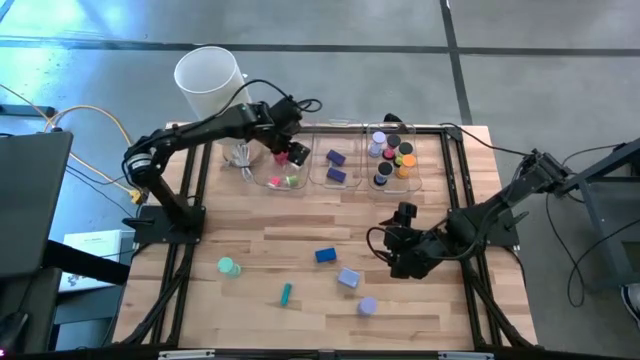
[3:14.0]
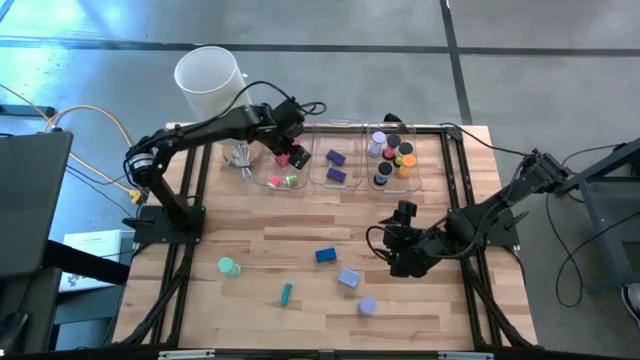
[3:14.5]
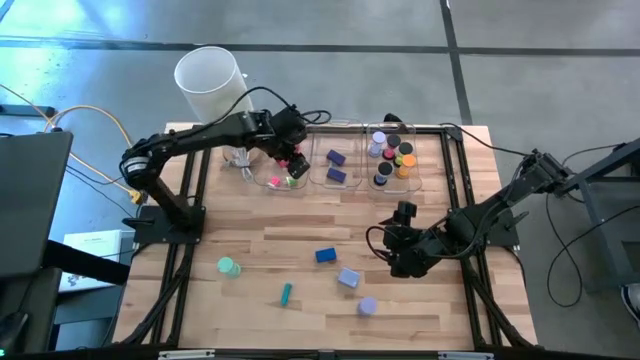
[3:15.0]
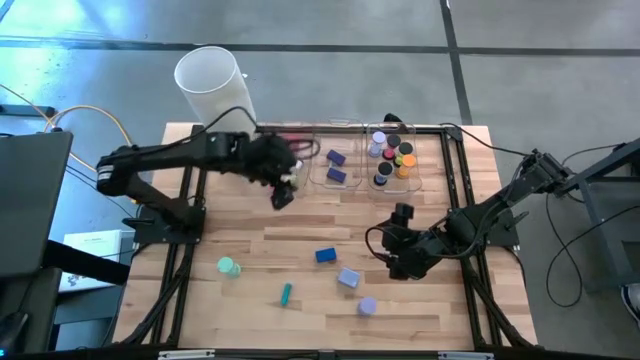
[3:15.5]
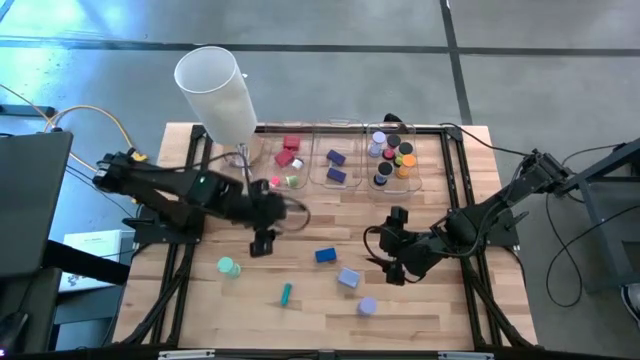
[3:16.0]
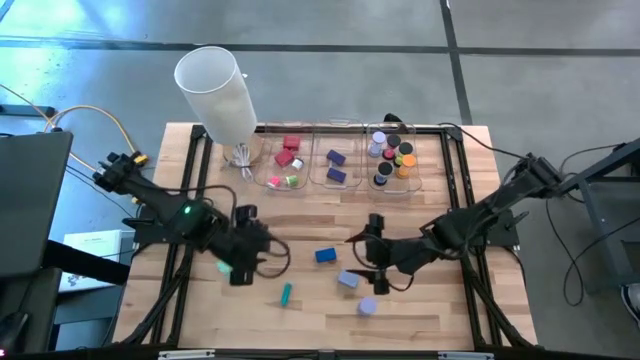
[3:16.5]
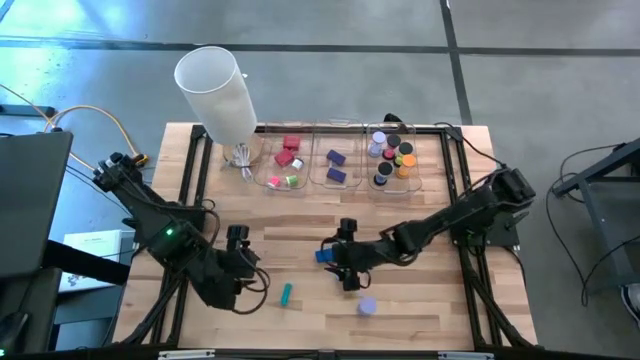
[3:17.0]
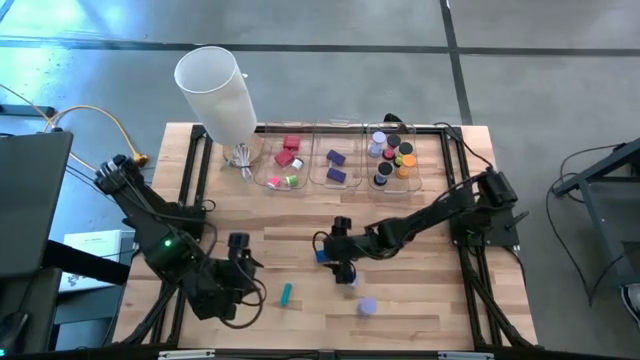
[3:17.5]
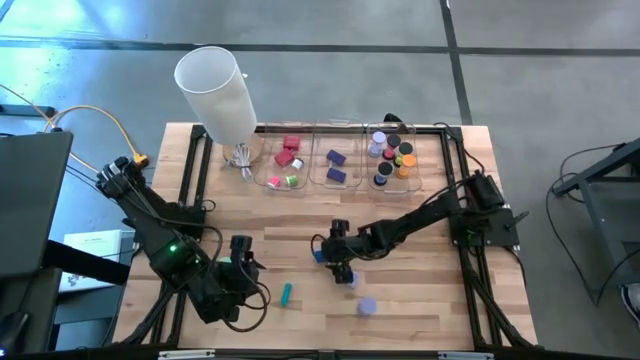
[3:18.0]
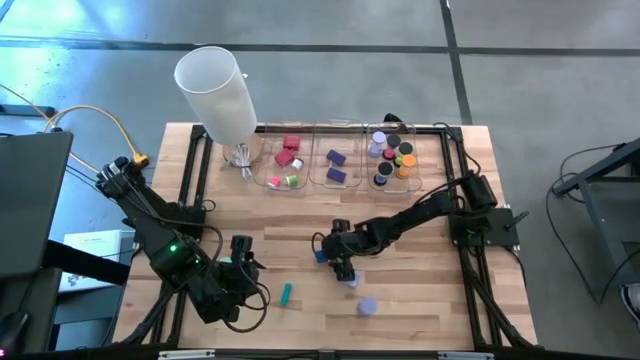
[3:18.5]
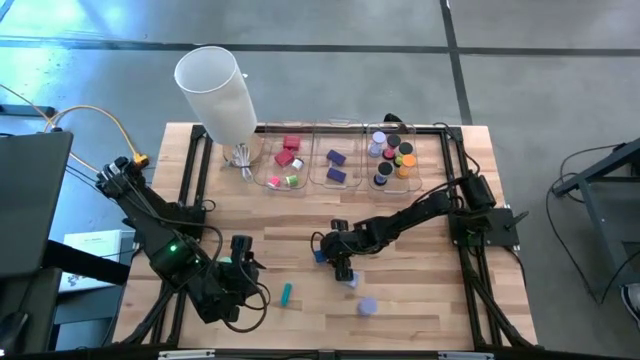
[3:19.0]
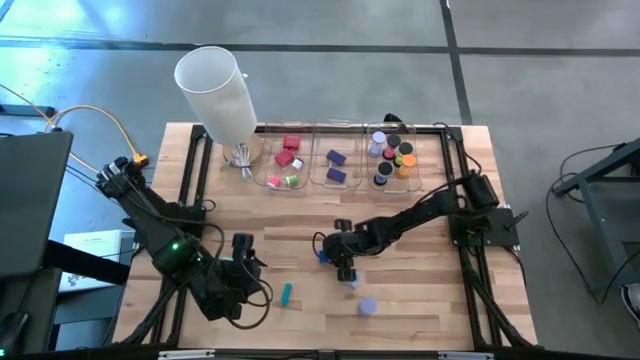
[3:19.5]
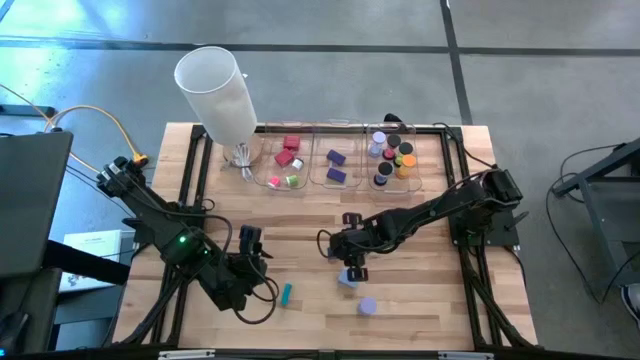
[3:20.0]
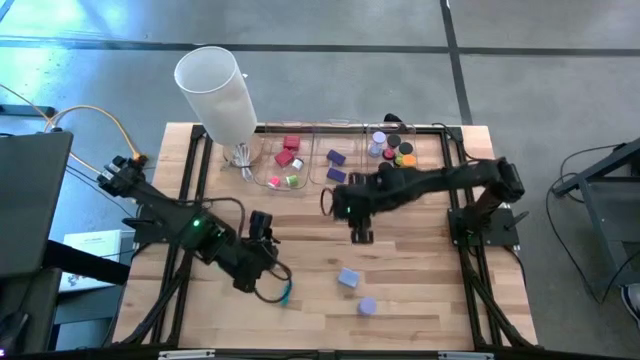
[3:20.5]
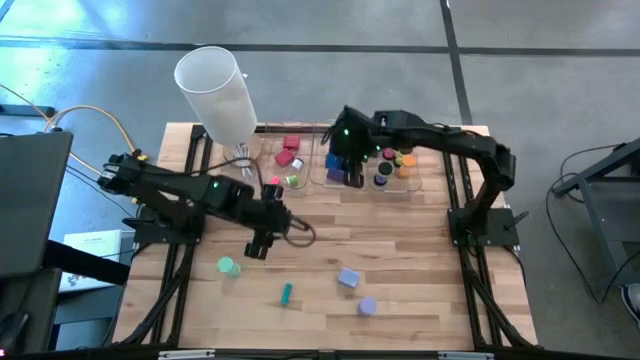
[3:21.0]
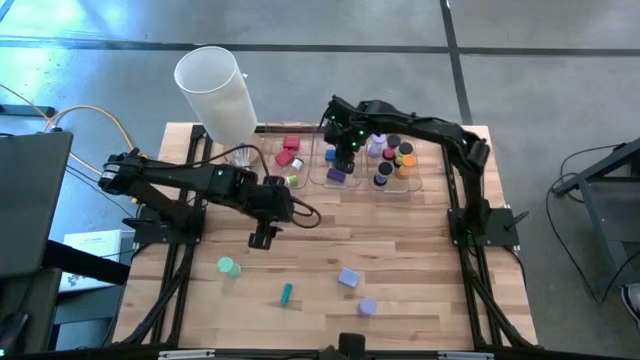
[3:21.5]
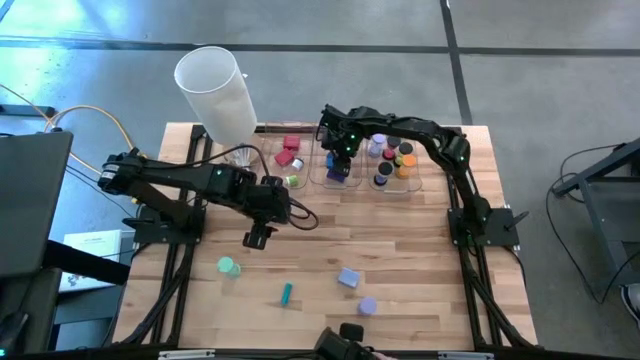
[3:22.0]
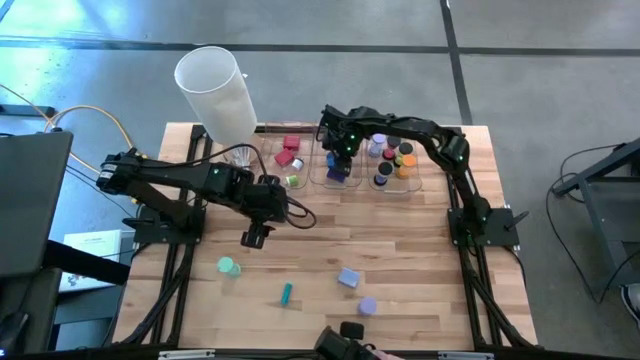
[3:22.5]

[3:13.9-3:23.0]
Task: Pick & Place Office items
Put the dark blue digital clock into the middle transparent bin

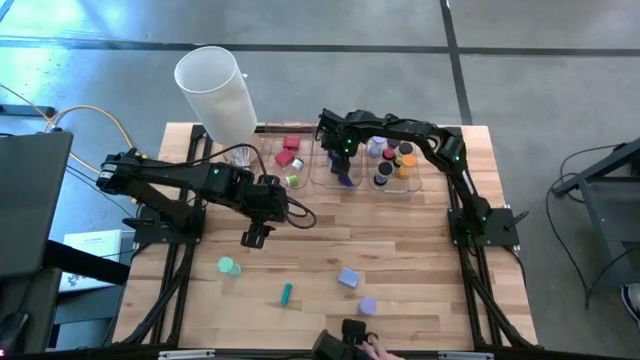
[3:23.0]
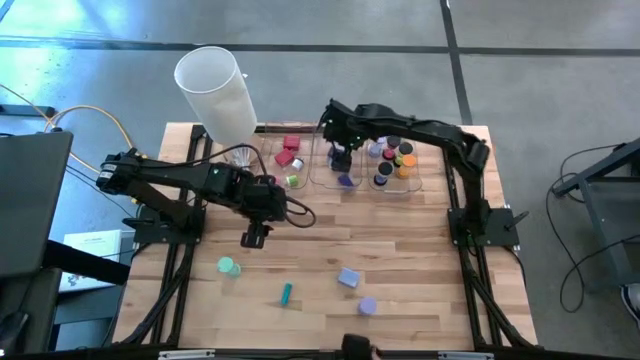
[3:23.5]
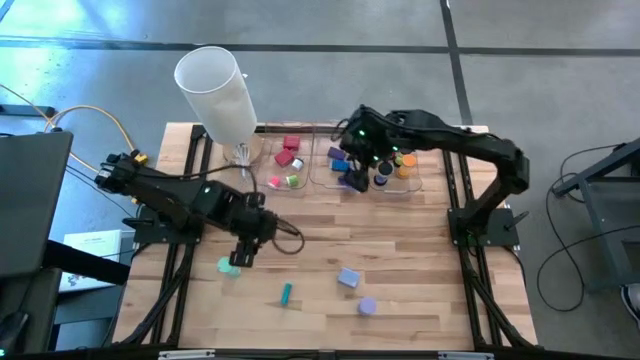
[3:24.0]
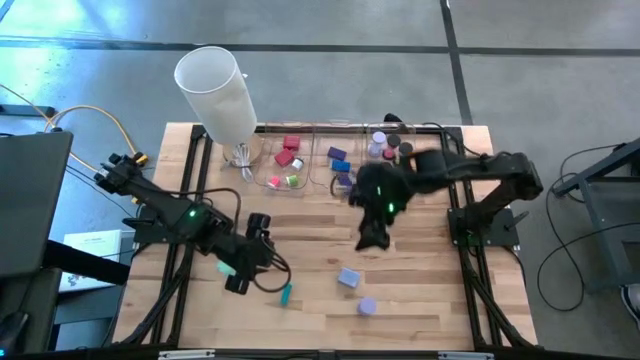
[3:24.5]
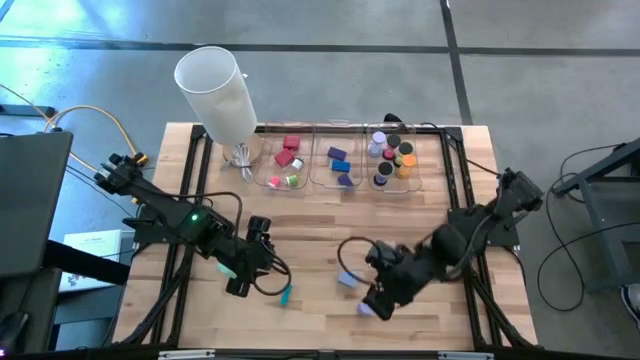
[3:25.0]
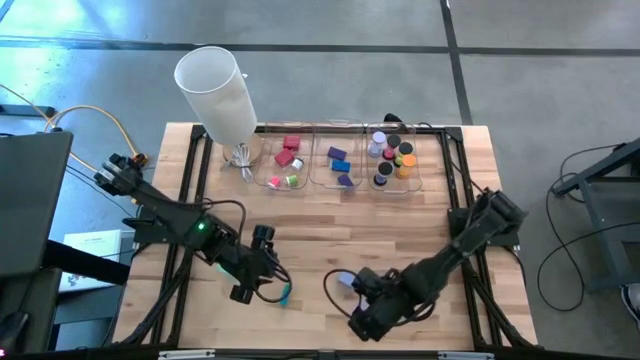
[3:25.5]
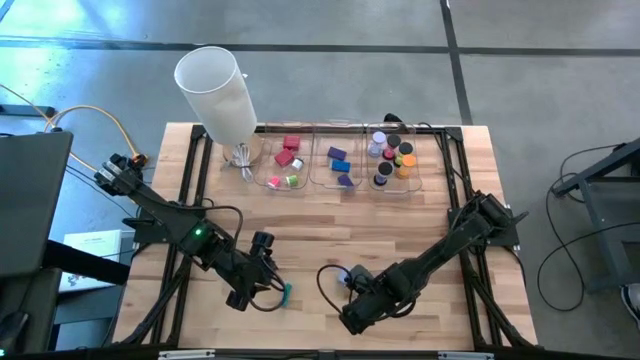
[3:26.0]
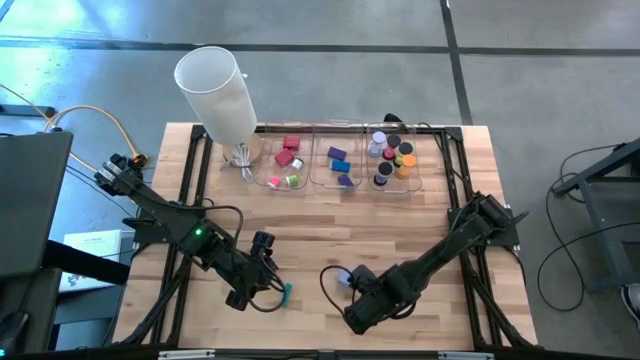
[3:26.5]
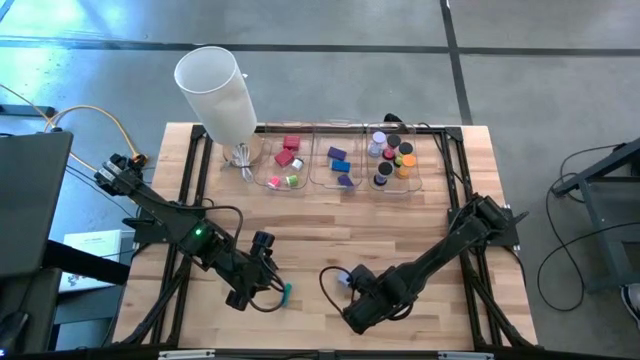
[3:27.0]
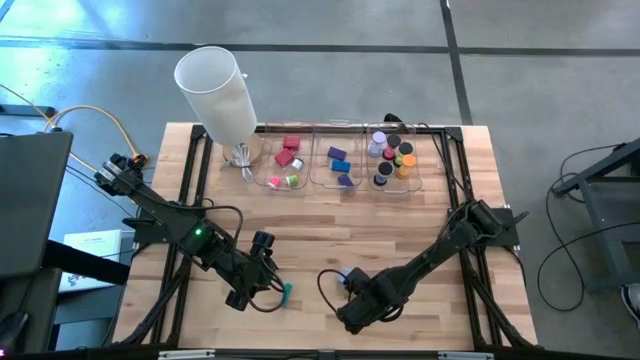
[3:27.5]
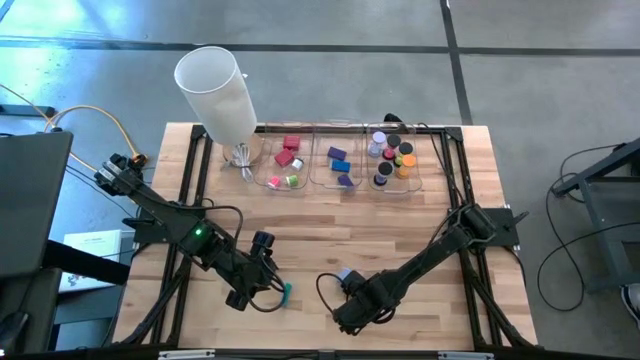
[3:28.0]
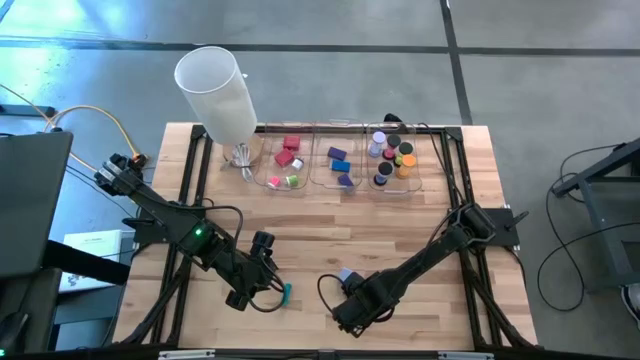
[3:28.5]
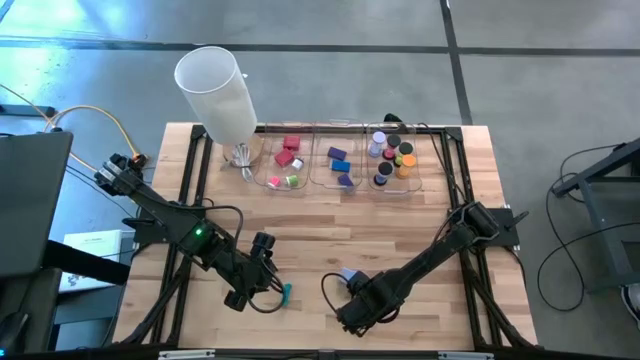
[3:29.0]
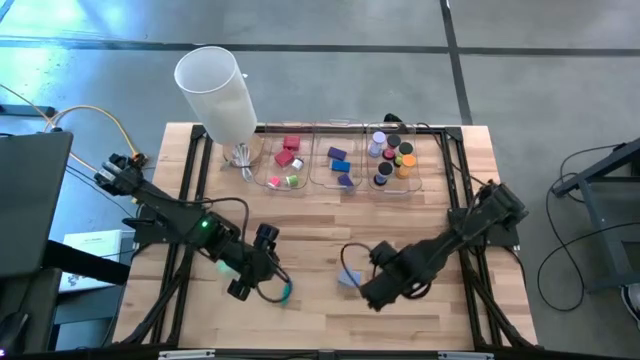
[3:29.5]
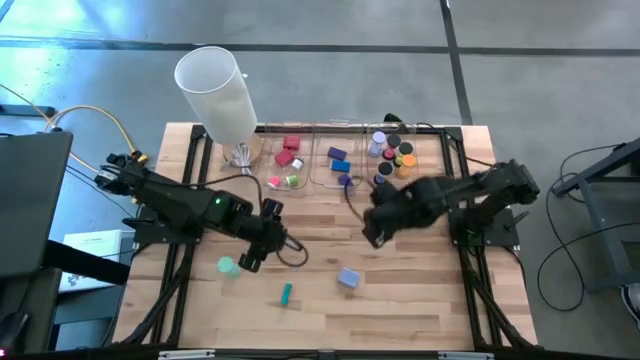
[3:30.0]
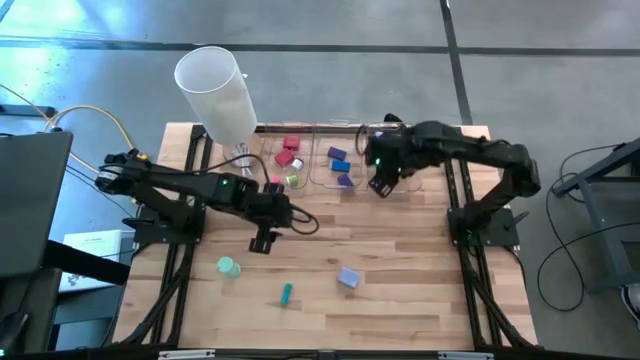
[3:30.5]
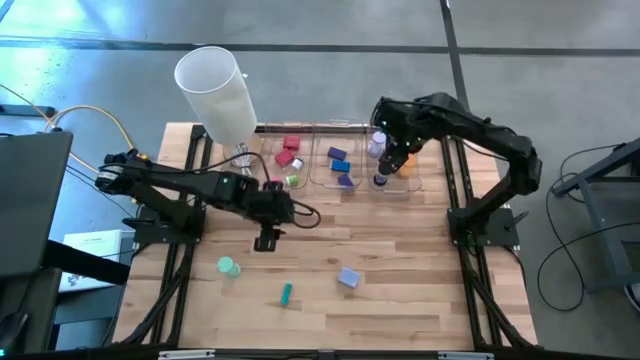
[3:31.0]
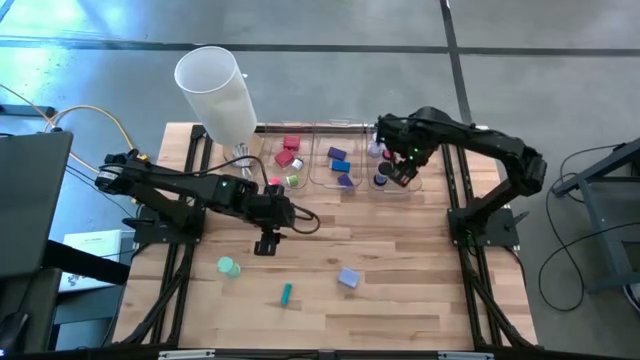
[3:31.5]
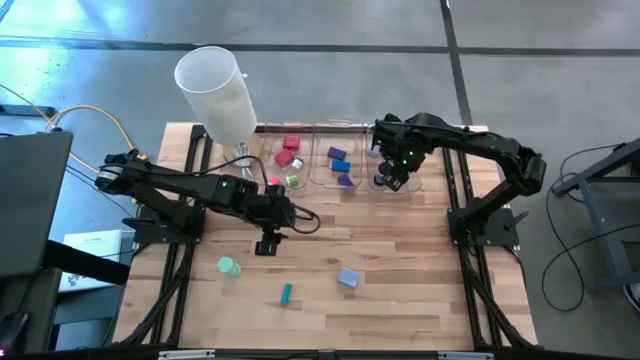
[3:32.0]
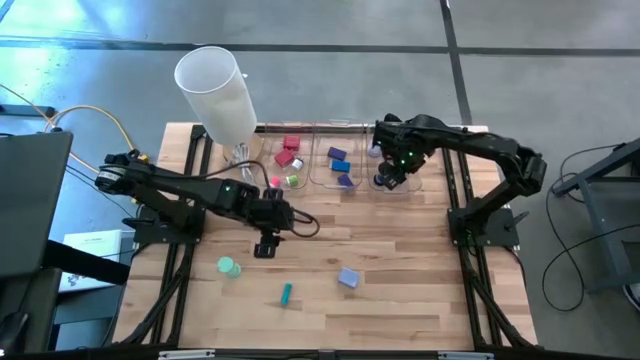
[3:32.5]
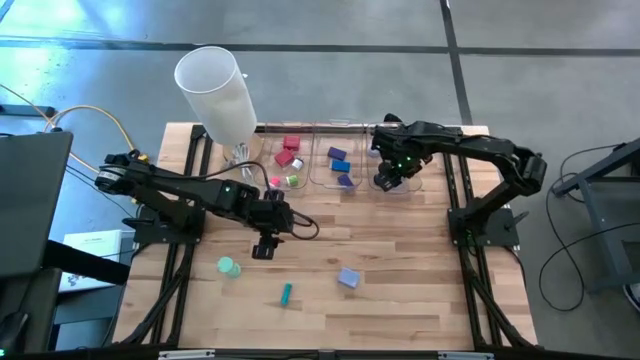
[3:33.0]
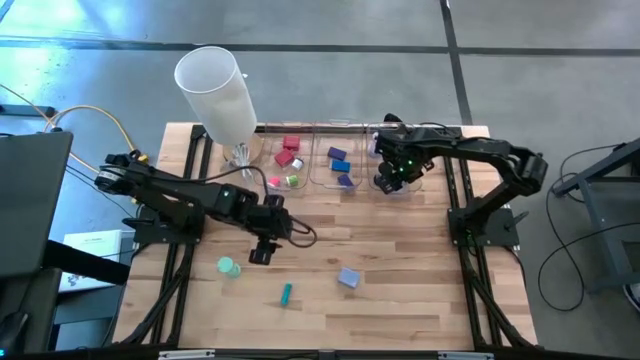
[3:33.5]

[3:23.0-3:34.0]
Put the purple hourglass into the right transparent bin

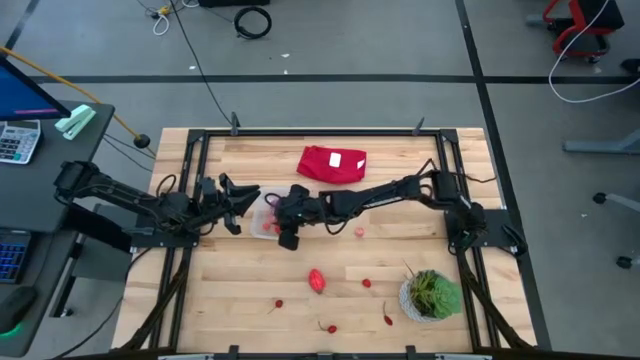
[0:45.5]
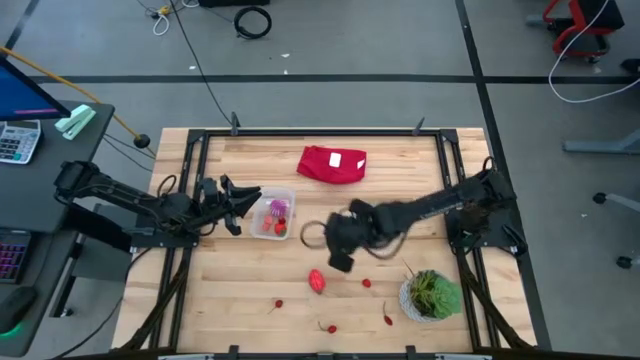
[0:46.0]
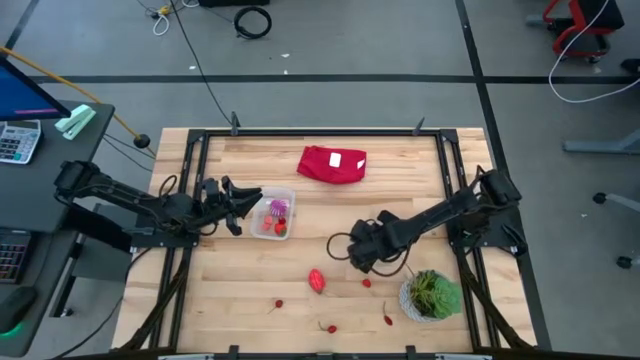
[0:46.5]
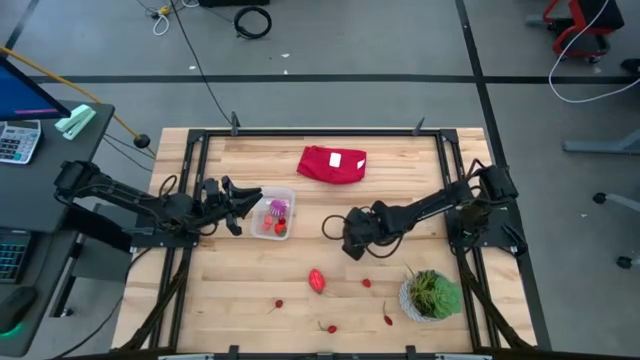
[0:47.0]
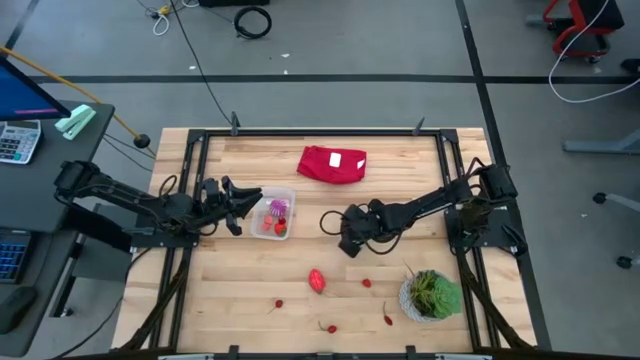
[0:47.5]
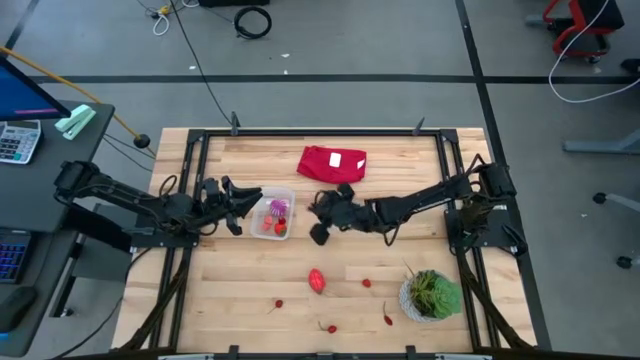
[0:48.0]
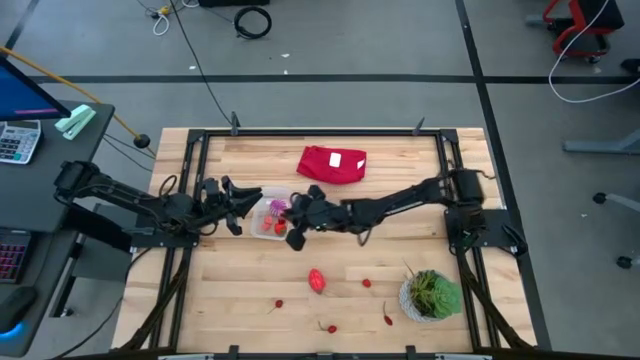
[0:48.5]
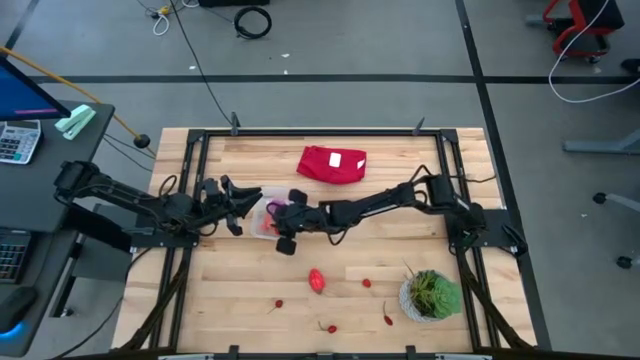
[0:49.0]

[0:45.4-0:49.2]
Task: Pick and placing Produce into tupperware
Put the pink peach in the transparent bin
